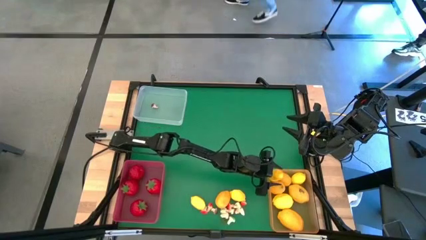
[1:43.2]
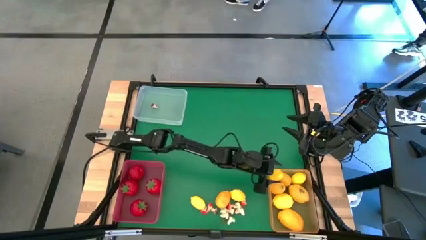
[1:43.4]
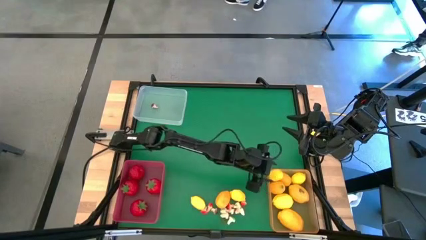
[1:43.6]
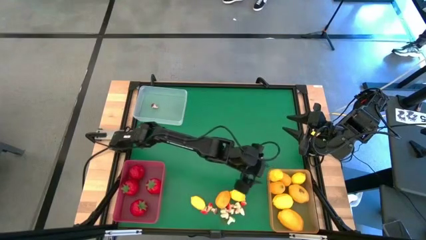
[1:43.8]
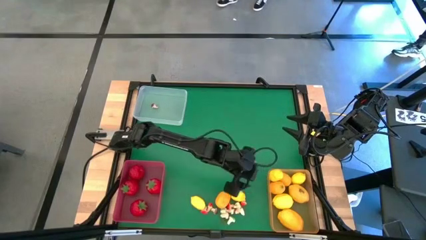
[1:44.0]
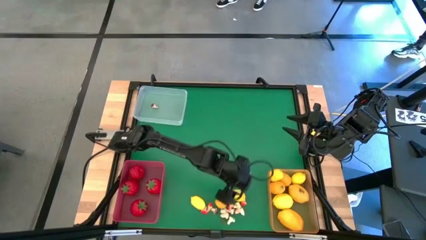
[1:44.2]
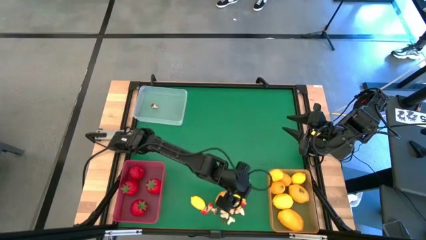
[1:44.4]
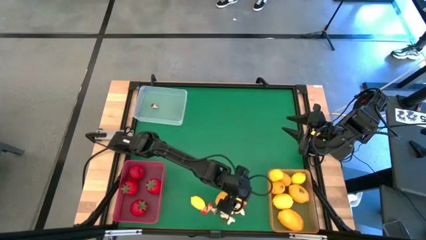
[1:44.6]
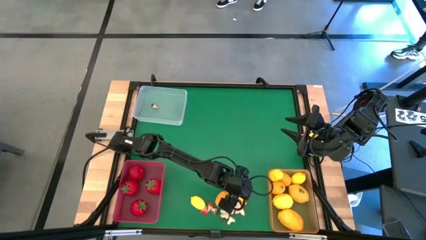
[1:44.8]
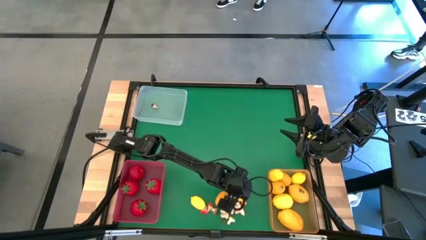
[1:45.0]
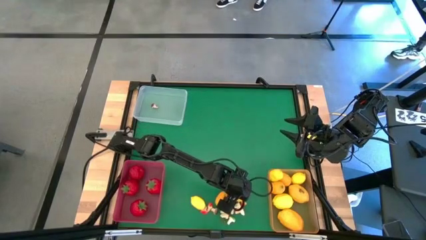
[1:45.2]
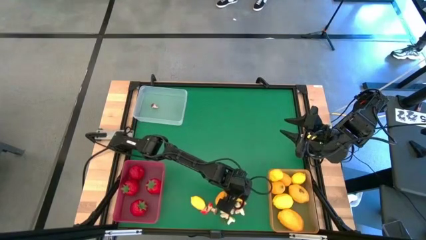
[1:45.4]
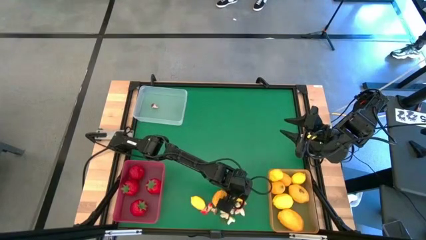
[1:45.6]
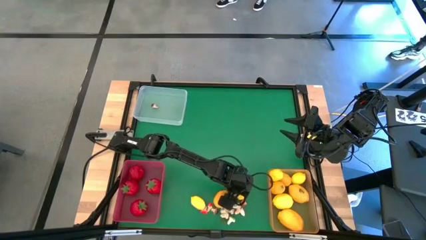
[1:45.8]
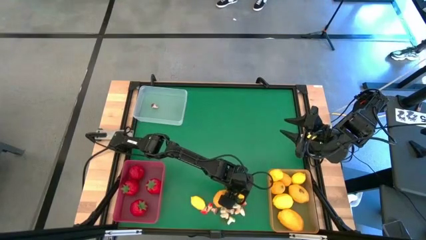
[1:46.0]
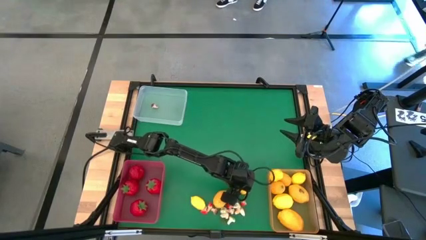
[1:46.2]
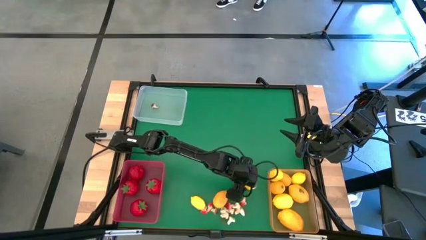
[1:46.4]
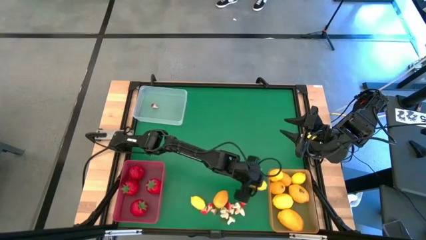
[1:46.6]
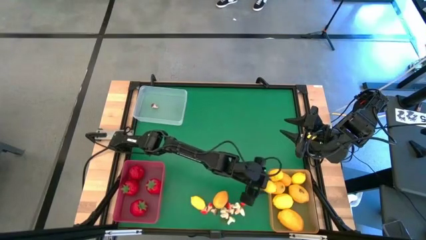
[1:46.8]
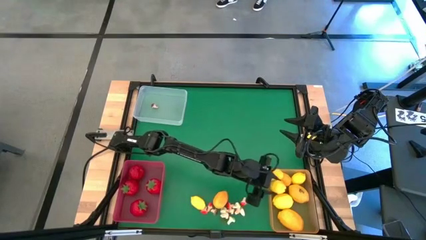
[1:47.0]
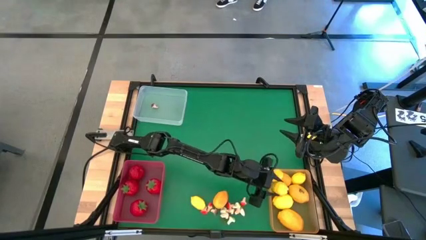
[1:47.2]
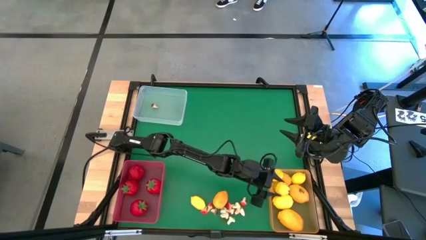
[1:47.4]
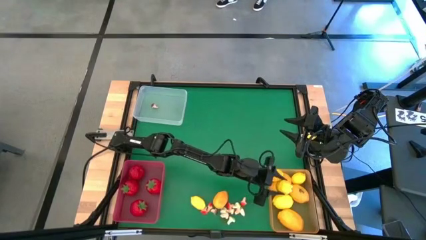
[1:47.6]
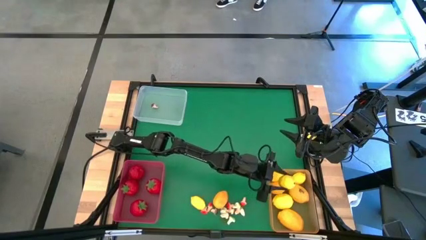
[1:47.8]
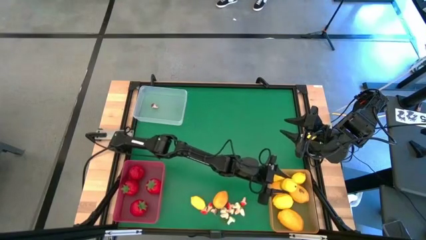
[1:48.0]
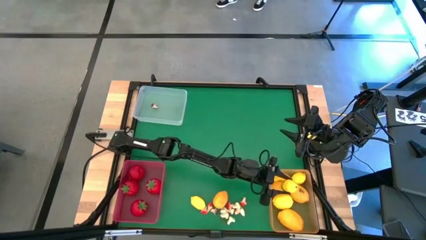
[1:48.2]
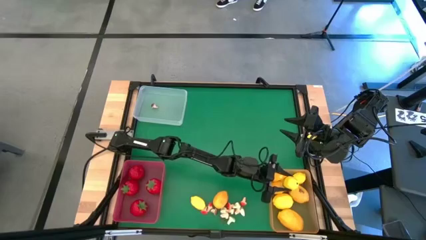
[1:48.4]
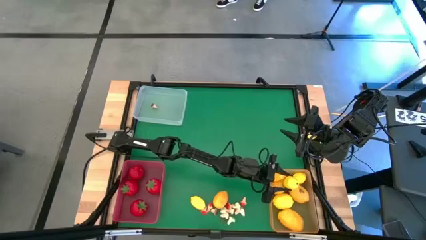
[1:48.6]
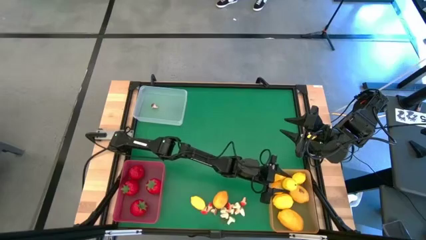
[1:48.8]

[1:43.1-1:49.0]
Task: Sort produce into baskets
Put the yellow lemon into the orange bin

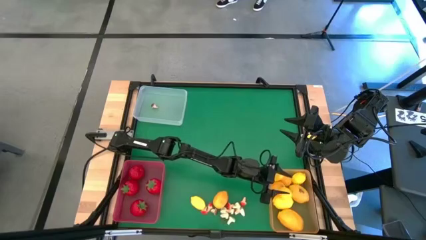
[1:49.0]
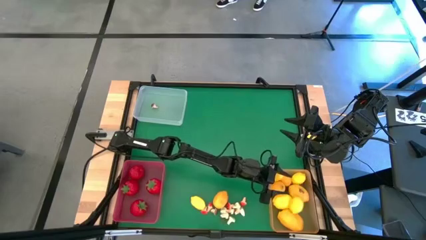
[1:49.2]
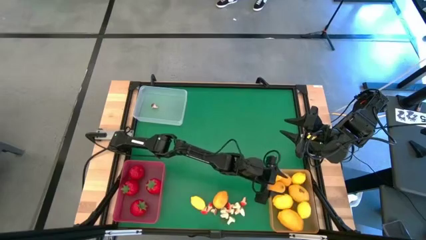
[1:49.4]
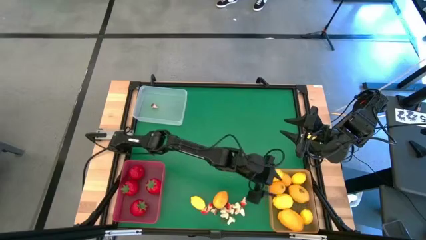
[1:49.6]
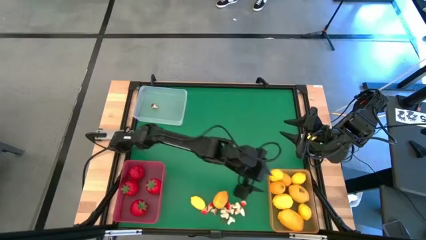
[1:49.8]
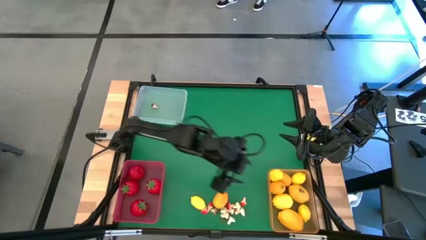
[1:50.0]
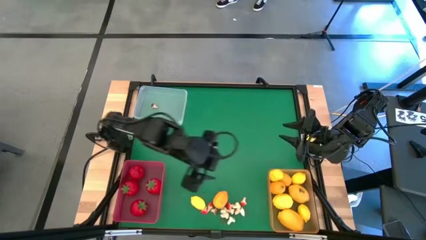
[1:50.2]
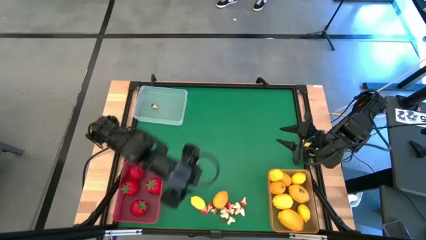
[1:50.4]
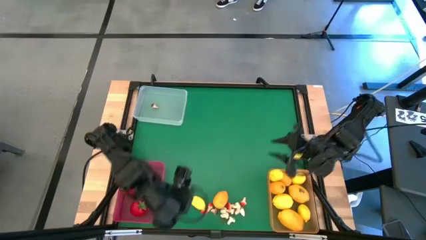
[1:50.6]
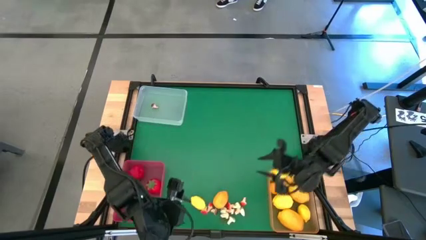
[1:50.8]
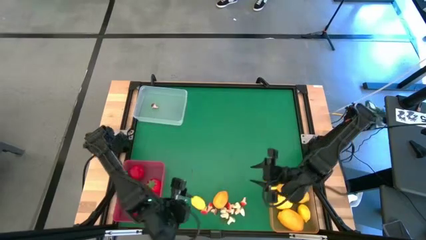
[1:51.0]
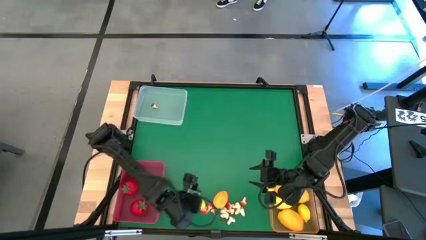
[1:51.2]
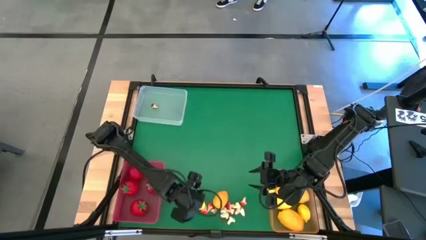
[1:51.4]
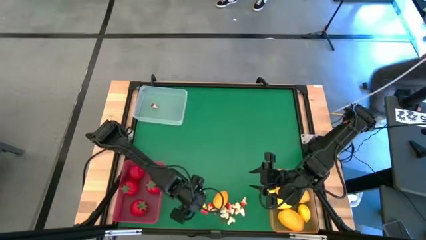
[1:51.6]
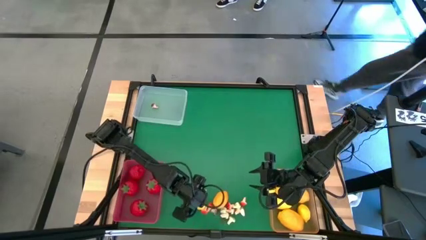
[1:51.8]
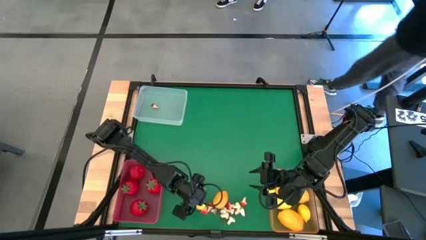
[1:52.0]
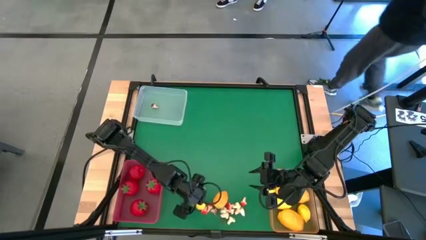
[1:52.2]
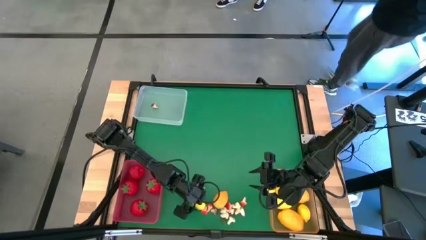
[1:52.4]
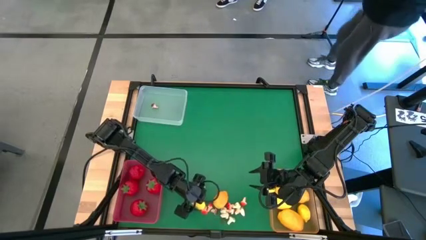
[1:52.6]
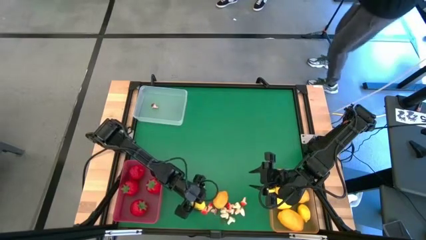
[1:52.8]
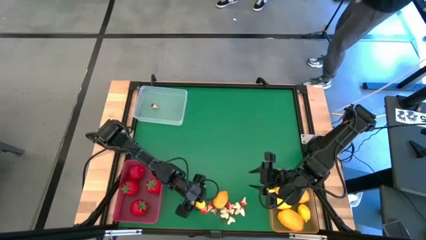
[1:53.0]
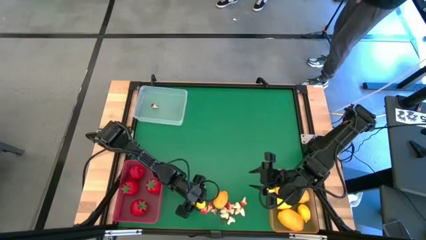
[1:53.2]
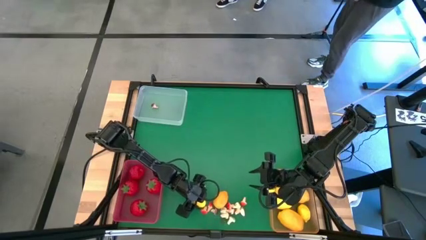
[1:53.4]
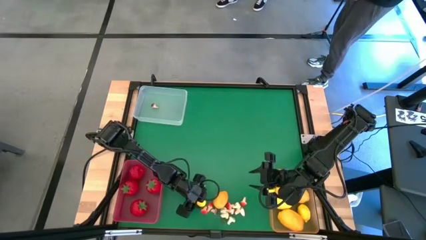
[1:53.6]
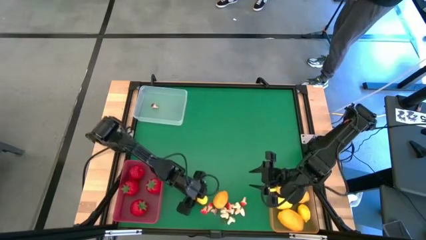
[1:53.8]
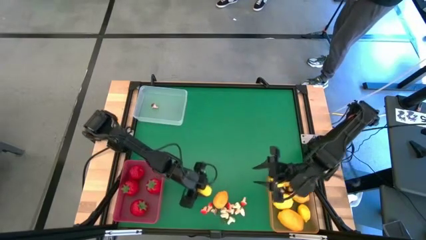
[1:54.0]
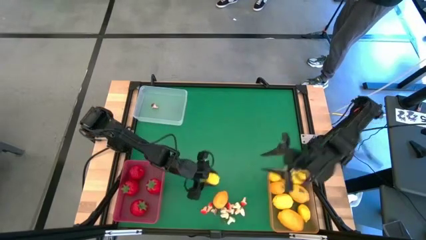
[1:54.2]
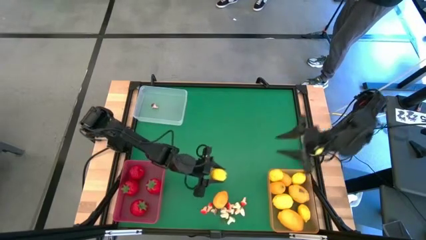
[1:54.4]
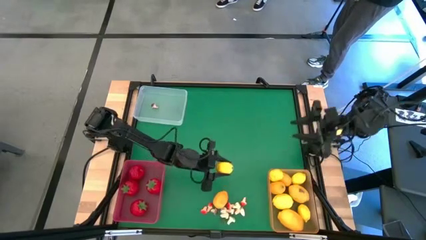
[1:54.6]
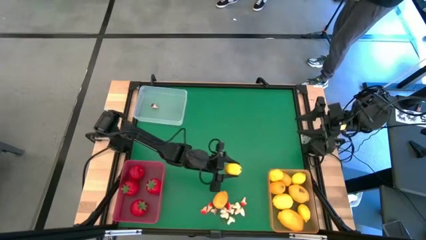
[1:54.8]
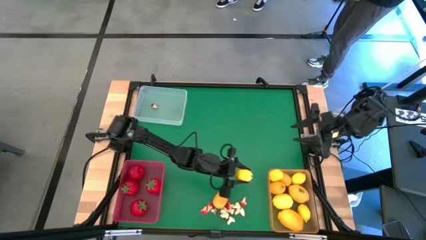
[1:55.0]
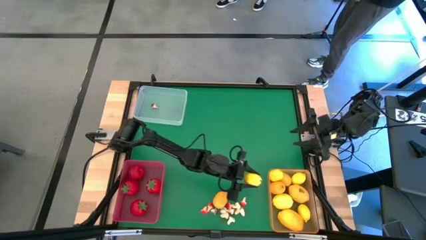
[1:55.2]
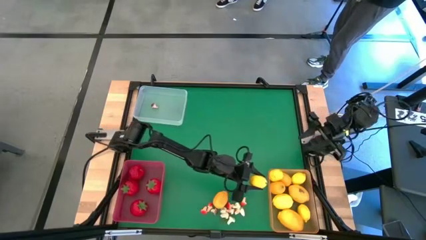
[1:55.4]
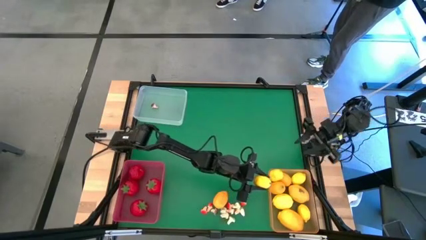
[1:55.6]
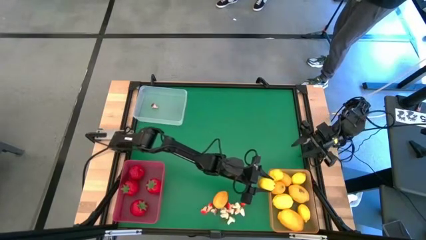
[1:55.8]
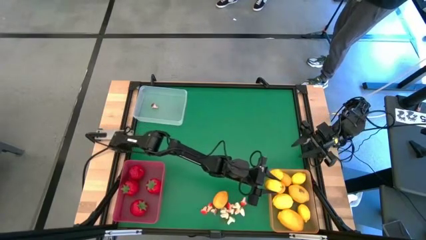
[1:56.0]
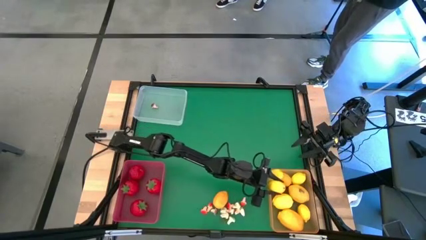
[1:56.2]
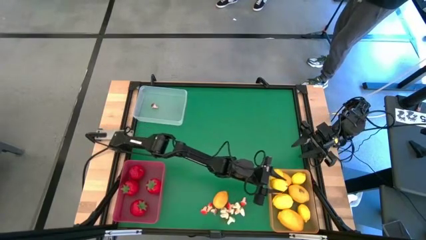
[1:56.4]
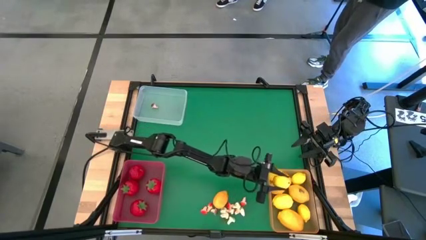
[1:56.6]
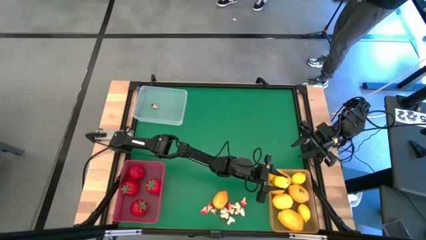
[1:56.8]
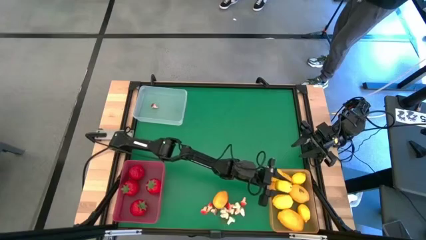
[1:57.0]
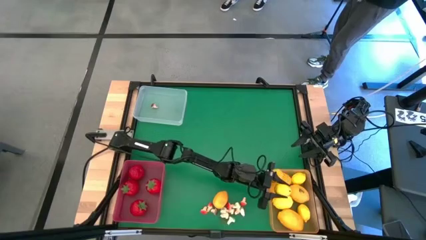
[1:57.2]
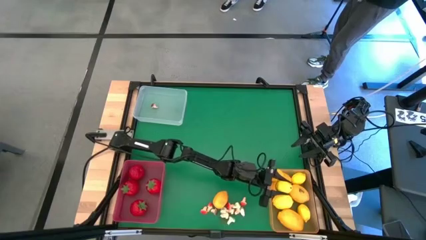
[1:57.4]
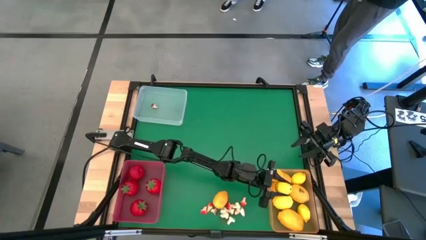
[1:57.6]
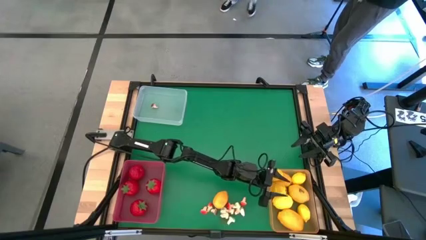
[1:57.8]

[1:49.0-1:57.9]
Put the yellow lemon into the orange bin
